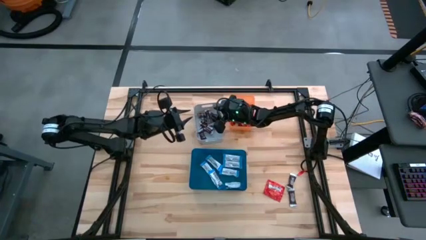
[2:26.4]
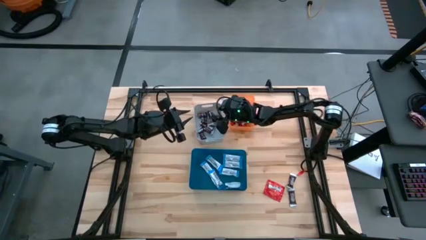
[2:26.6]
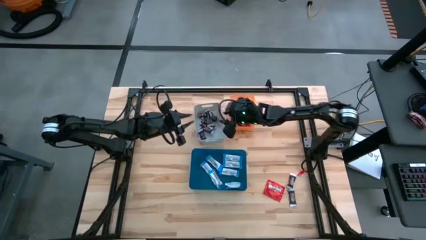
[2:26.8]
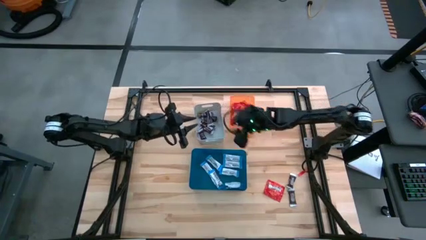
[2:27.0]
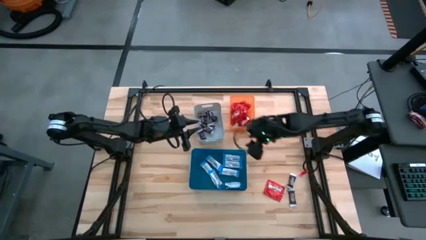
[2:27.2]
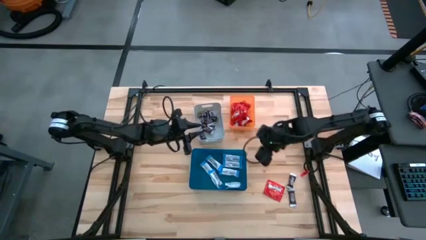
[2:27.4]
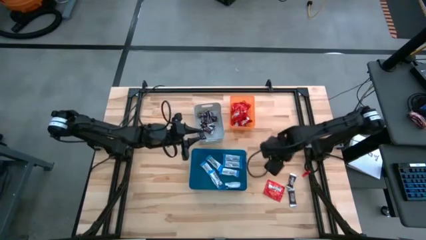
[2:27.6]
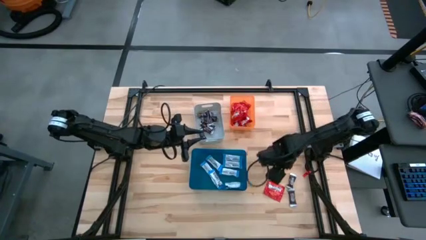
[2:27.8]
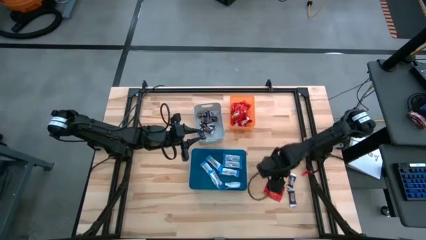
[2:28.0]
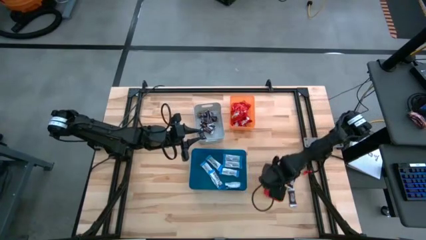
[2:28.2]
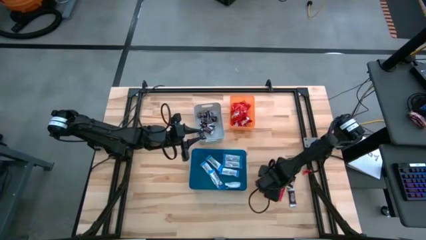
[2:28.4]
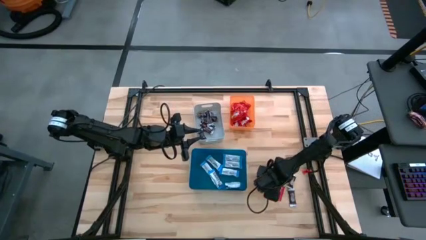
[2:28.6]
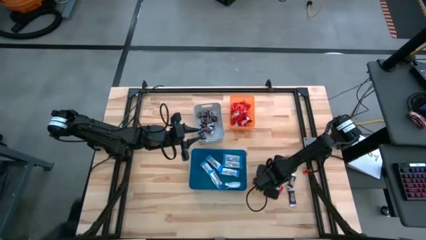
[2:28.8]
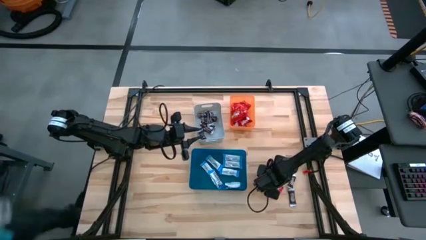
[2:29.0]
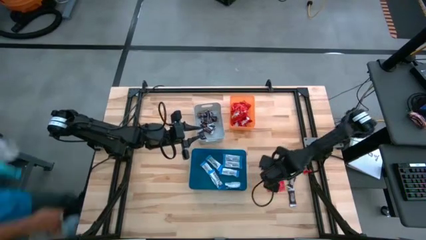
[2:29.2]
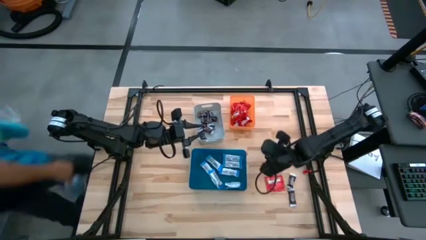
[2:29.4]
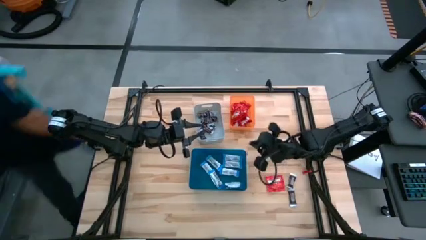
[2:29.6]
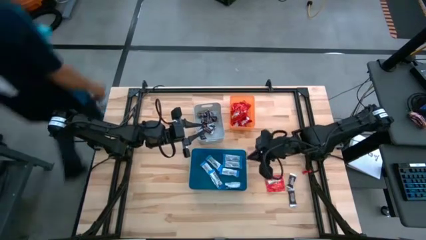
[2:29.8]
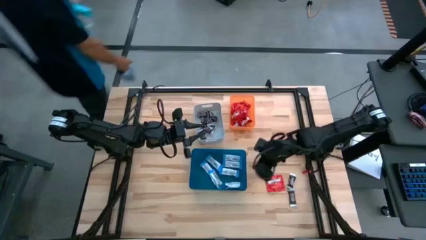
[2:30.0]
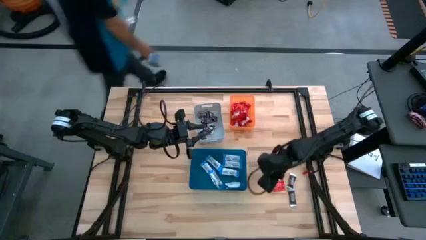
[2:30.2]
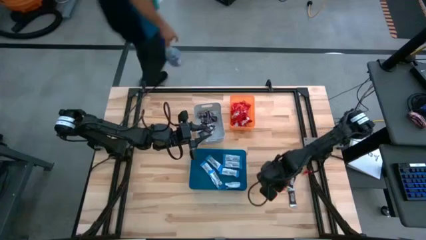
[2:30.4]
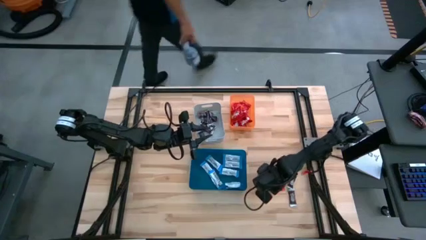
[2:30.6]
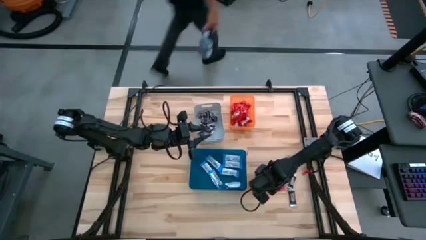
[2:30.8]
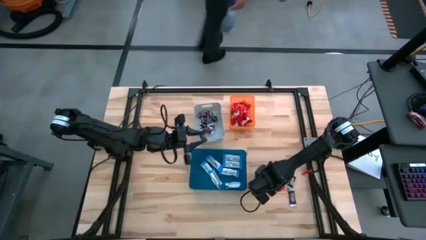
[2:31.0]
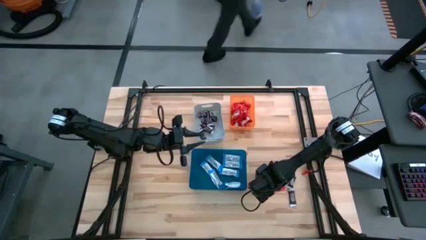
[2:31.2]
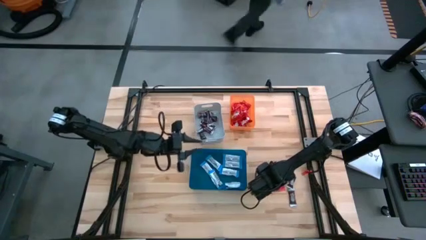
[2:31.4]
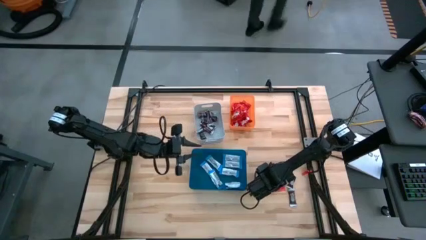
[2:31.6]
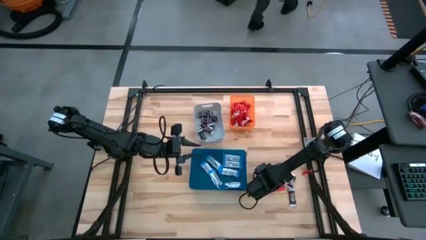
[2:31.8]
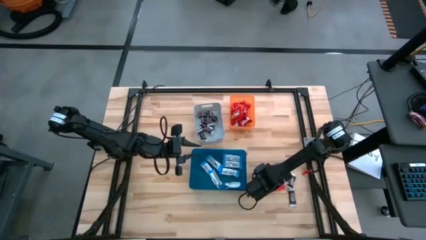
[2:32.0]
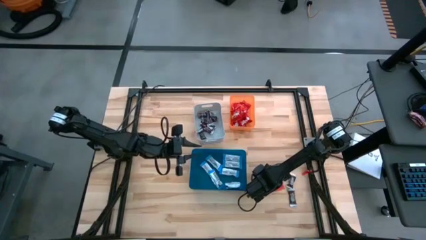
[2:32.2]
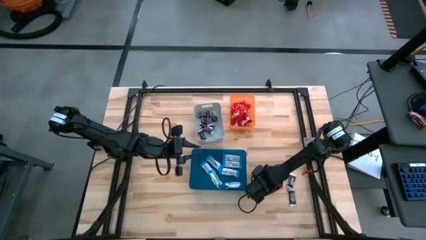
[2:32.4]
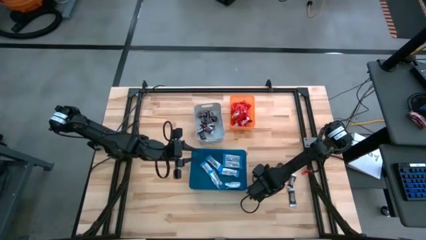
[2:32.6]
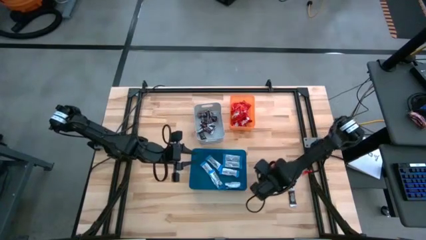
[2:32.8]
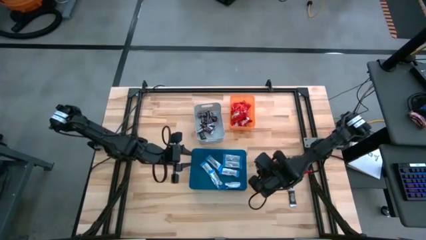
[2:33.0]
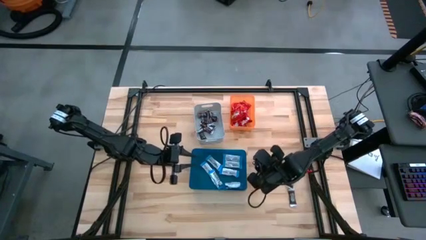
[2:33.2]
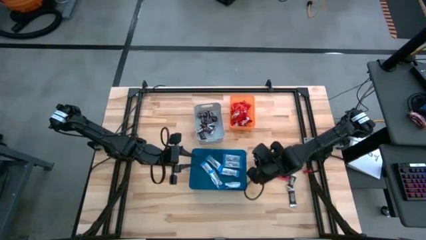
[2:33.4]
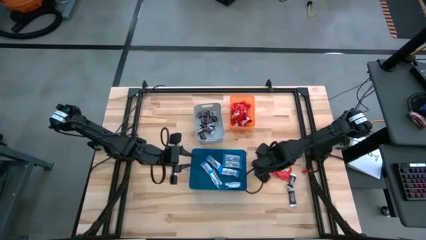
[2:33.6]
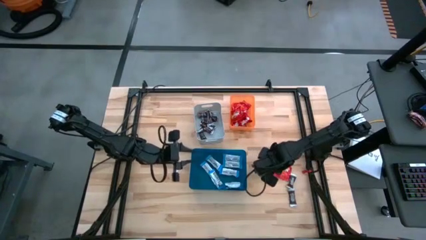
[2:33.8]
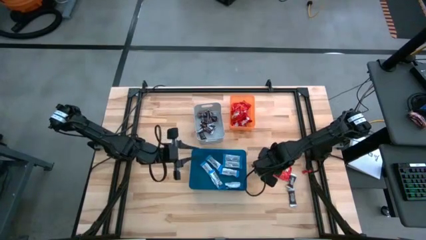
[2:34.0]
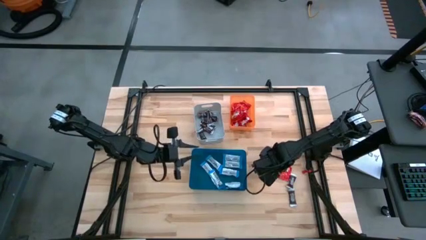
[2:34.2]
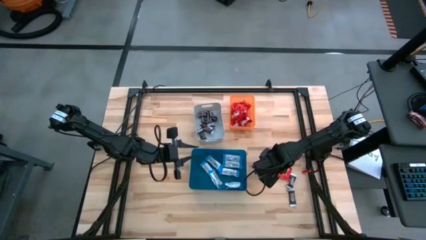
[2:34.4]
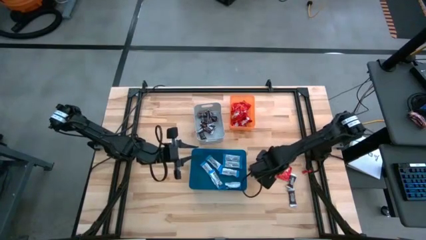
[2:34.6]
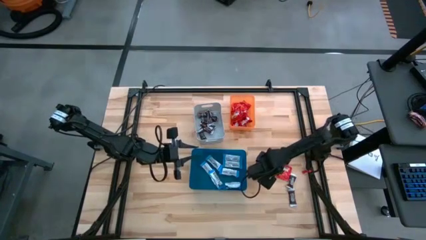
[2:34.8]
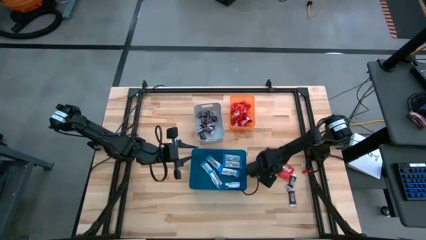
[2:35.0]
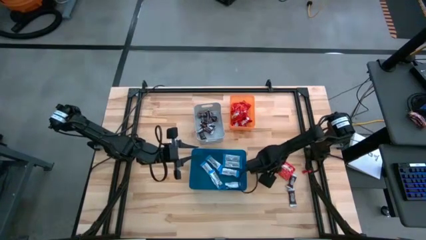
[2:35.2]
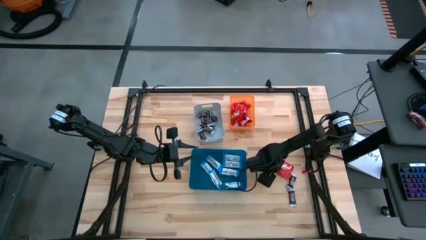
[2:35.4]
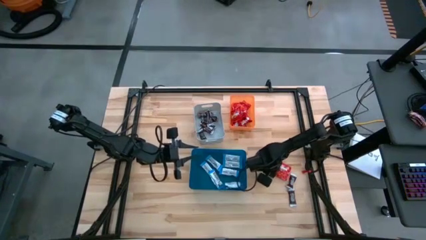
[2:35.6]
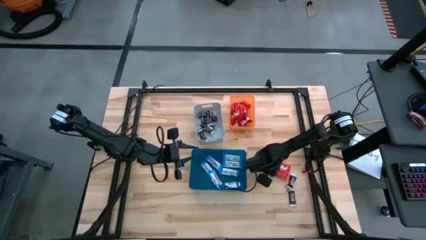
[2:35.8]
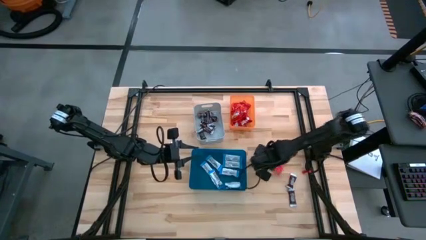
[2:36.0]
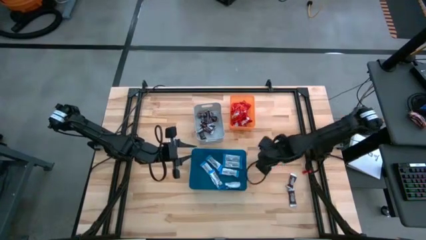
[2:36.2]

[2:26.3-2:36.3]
Task: Sort candy
Put the red chocolate into the orange bin

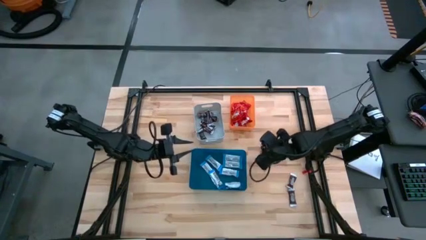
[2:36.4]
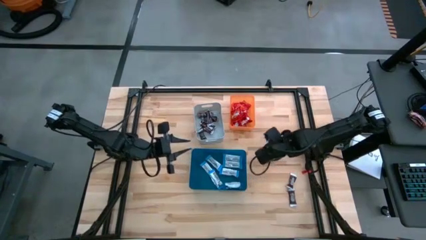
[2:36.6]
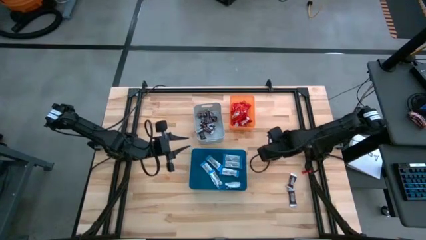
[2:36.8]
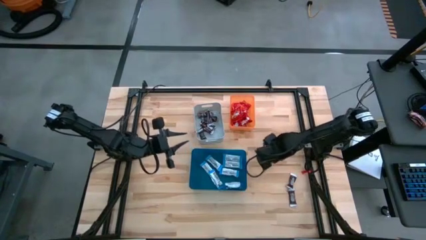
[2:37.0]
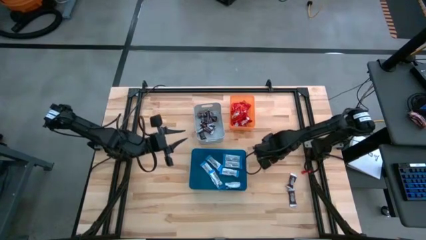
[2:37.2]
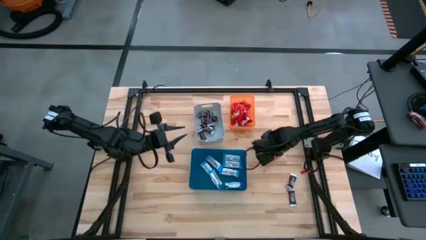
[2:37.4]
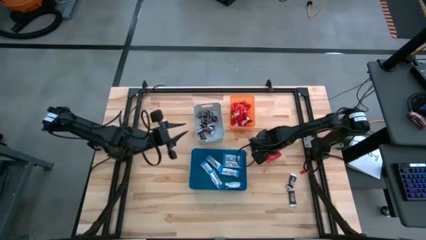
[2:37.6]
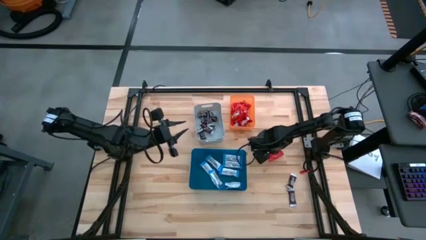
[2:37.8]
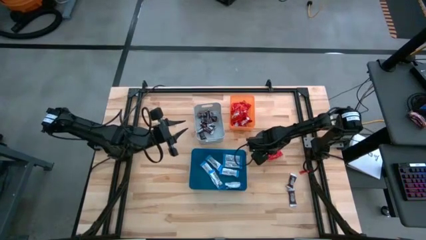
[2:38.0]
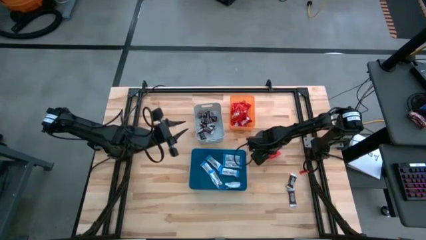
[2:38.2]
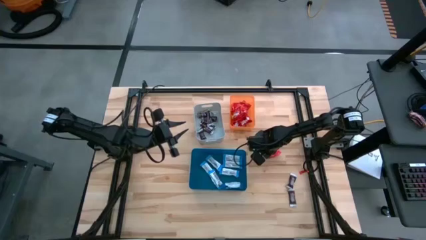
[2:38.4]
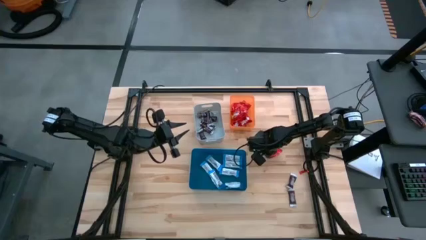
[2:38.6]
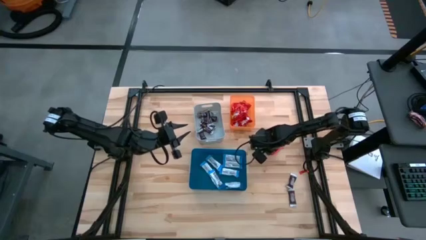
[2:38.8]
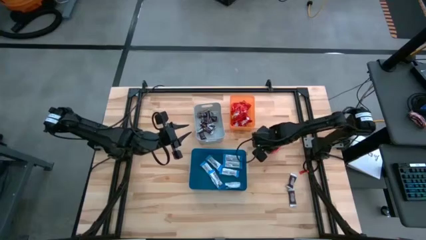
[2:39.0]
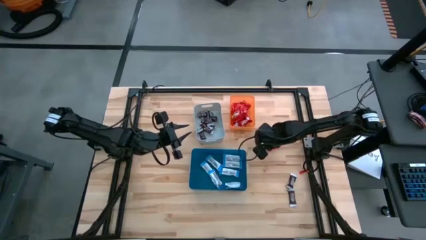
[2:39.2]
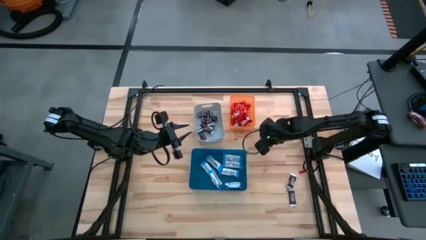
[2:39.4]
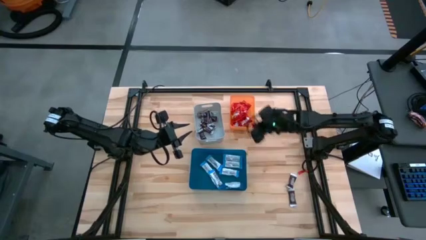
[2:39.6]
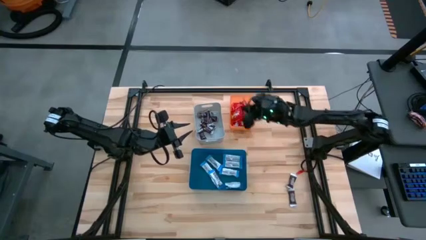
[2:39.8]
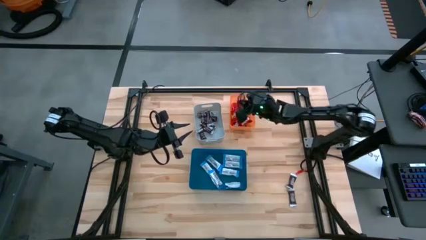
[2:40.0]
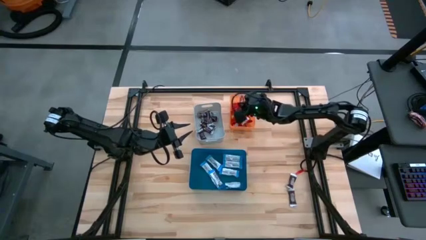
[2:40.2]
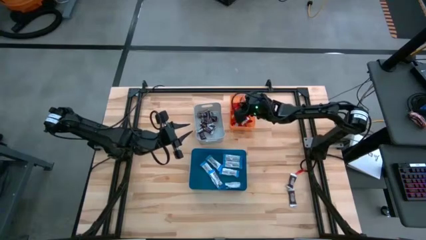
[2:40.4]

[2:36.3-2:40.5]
Put the red chocolate into the orange bin

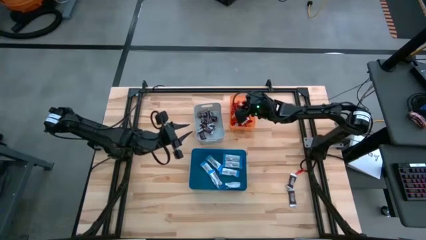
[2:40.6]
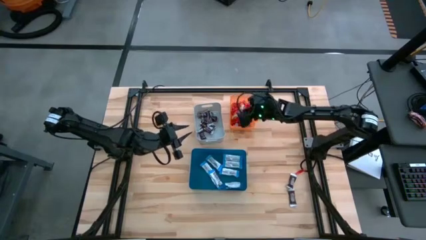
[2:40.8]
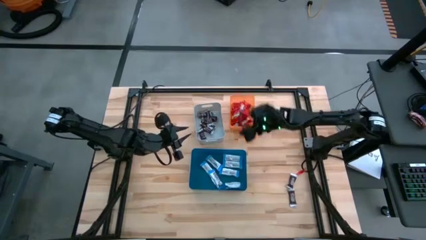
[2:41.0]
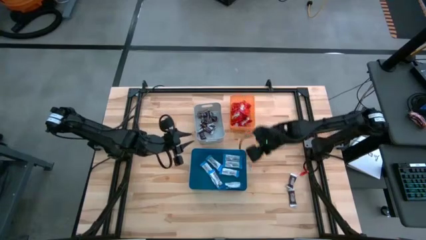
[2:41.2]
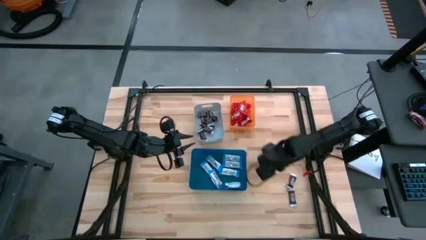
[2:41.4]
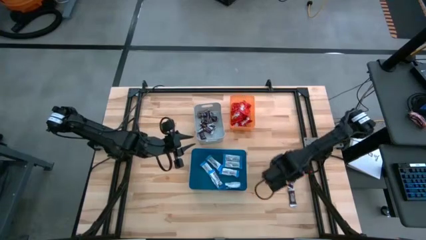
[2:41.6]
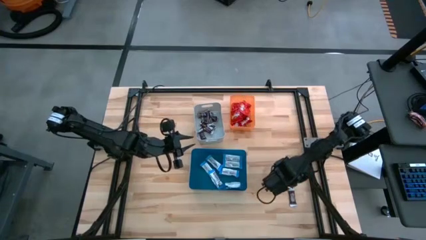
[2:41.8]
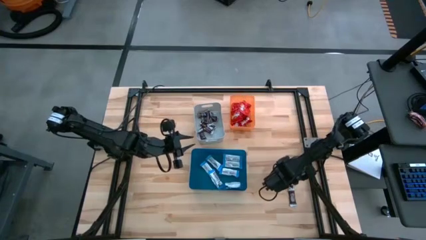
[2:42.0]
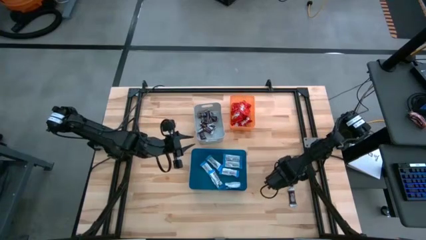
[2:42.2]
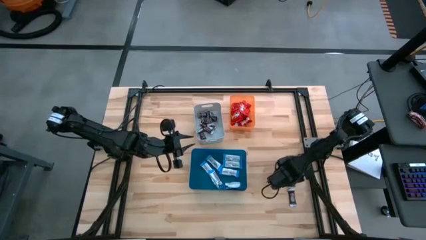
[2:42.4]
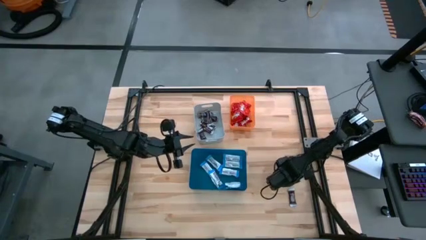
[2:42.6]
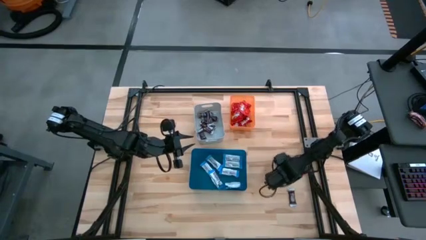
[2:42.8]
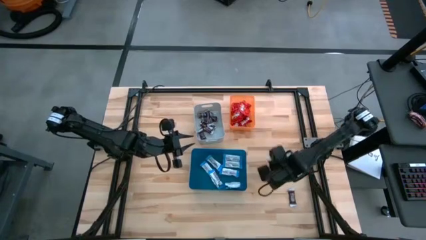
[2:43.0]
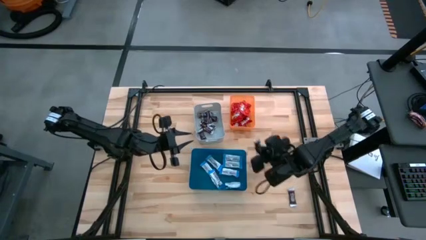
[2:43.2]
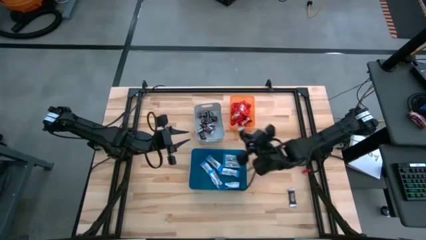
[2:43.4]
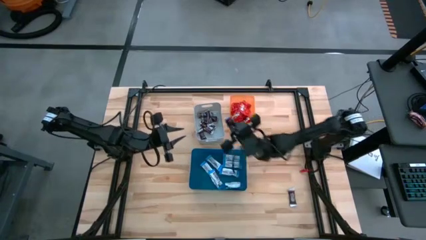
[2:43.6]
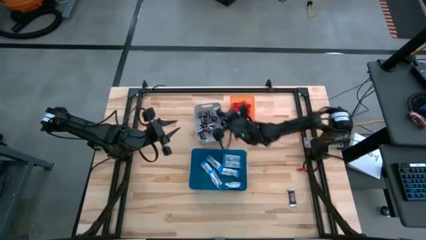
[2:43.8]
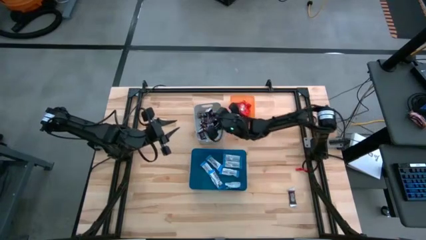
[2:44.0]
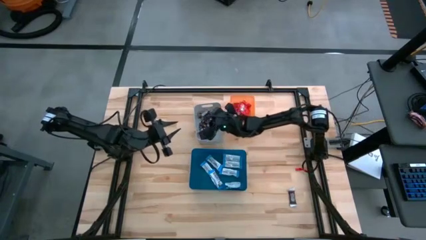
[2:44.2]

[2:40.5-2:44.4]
Put the brown chocolate bar into the gray bin
